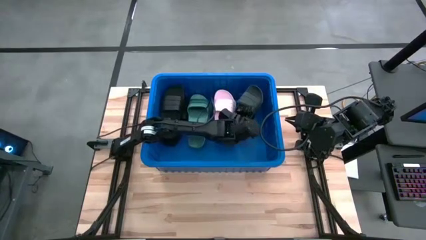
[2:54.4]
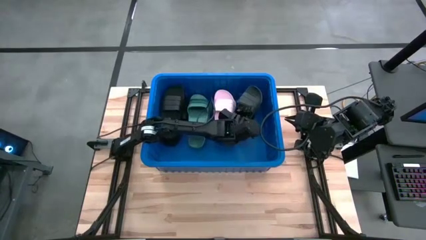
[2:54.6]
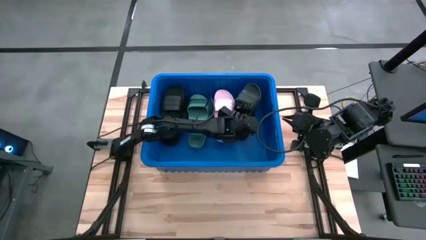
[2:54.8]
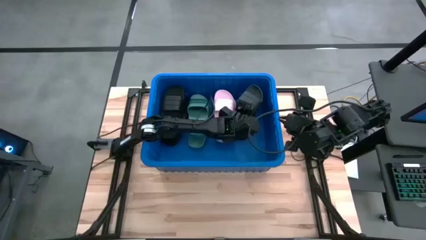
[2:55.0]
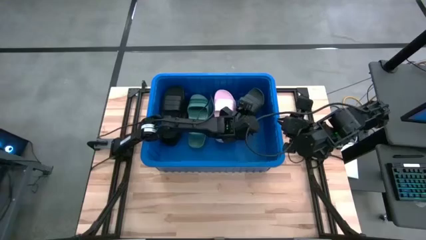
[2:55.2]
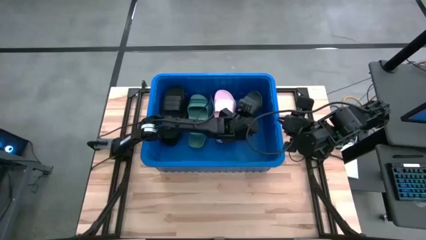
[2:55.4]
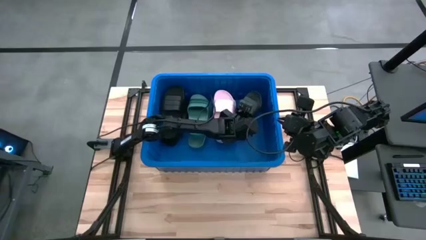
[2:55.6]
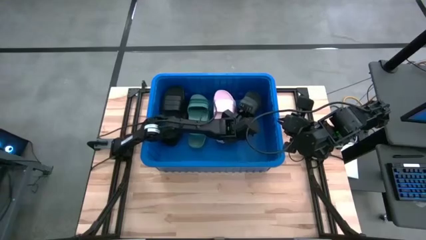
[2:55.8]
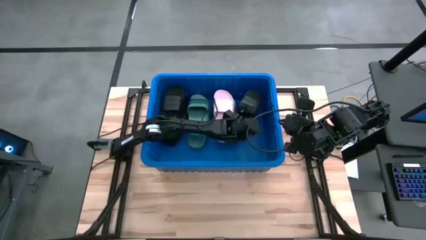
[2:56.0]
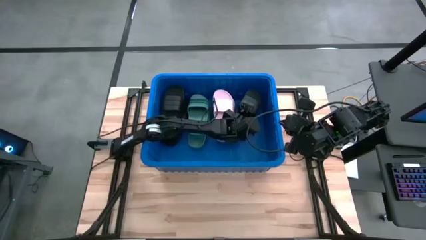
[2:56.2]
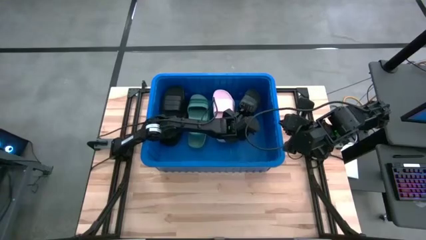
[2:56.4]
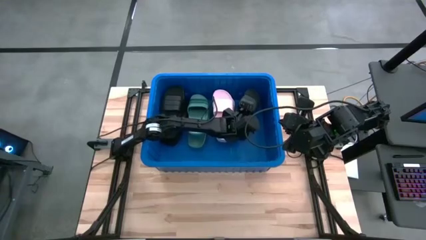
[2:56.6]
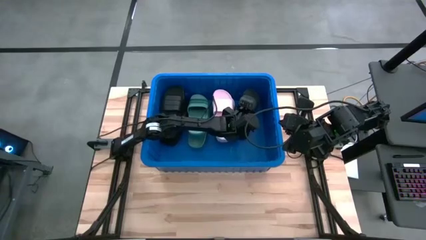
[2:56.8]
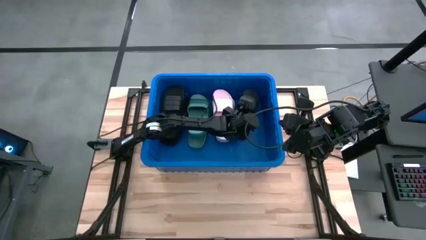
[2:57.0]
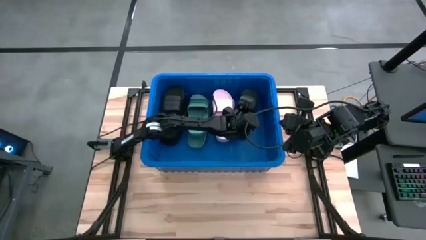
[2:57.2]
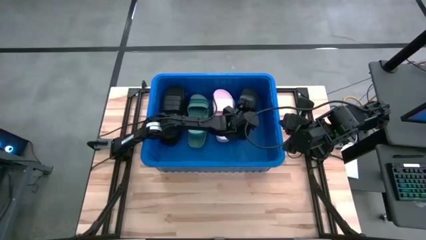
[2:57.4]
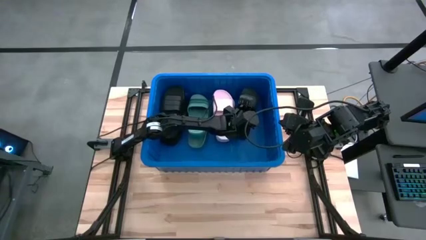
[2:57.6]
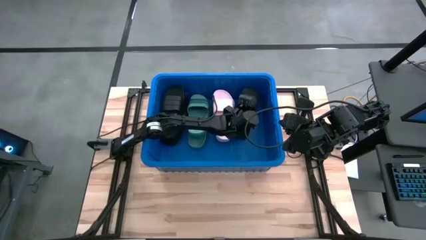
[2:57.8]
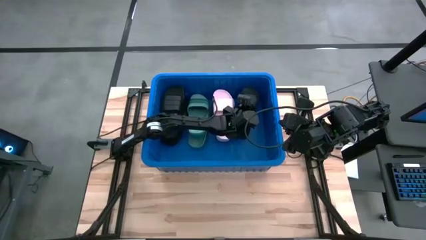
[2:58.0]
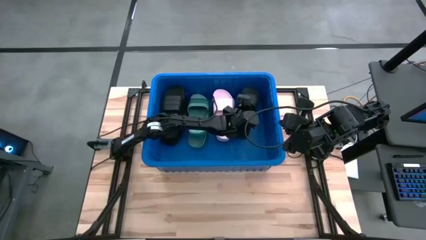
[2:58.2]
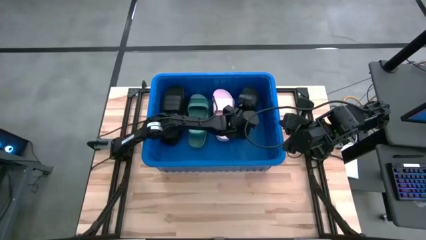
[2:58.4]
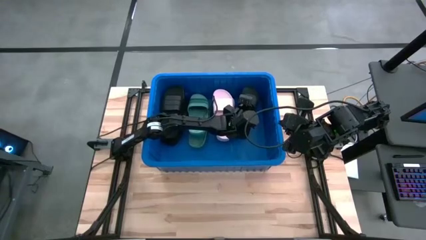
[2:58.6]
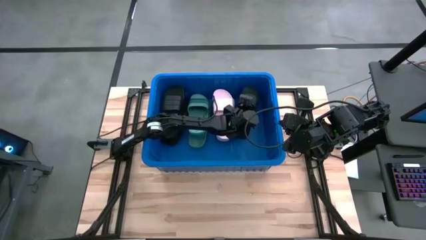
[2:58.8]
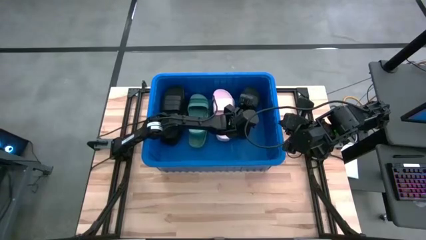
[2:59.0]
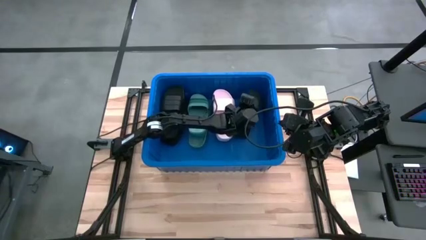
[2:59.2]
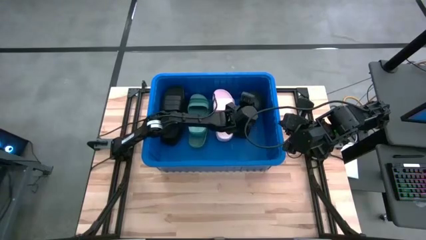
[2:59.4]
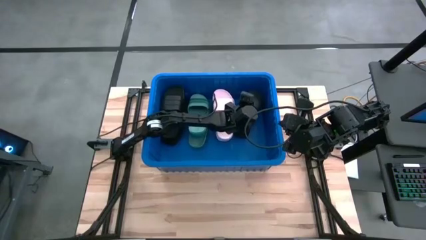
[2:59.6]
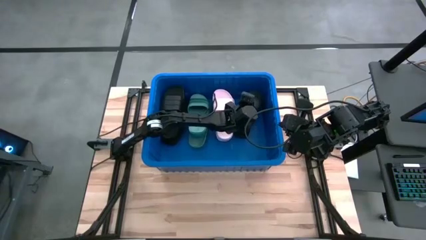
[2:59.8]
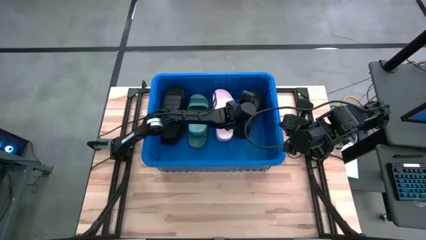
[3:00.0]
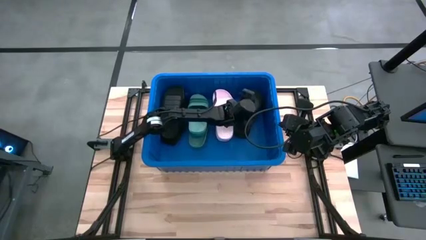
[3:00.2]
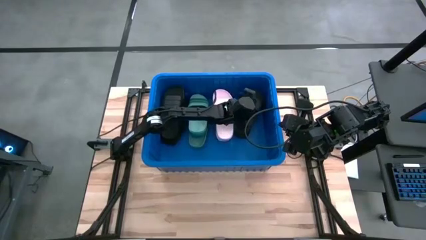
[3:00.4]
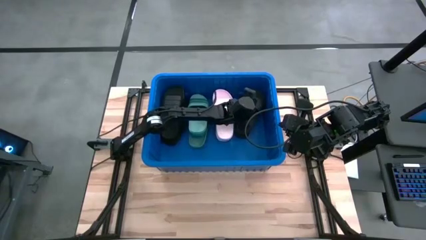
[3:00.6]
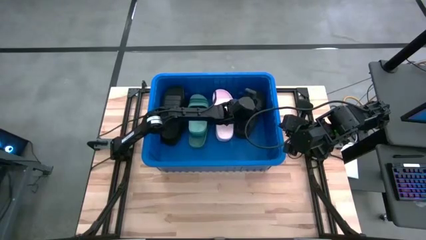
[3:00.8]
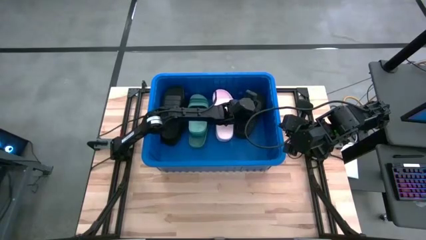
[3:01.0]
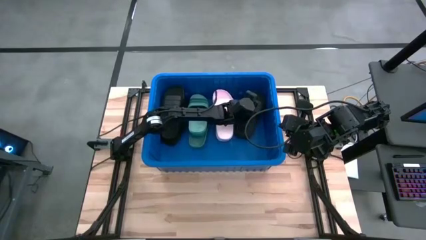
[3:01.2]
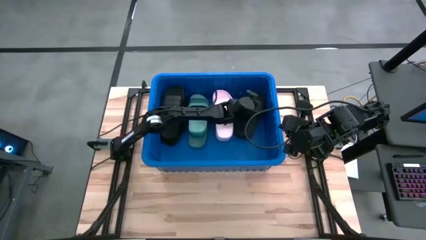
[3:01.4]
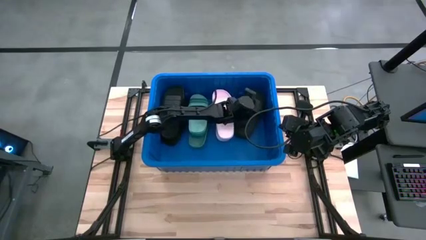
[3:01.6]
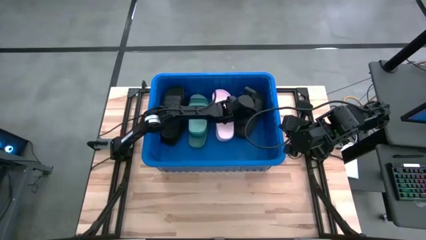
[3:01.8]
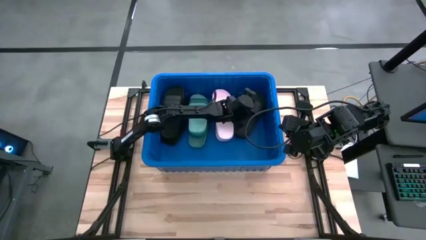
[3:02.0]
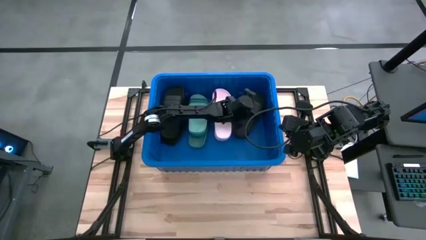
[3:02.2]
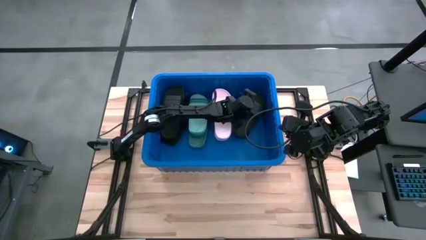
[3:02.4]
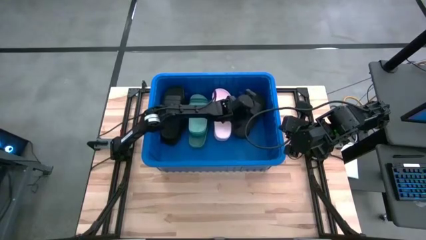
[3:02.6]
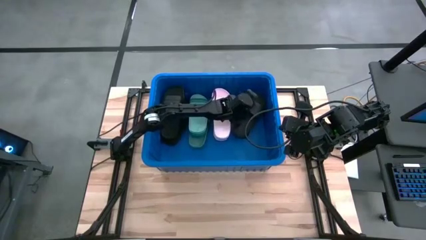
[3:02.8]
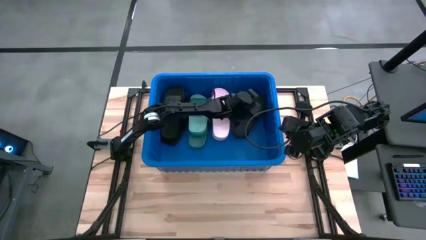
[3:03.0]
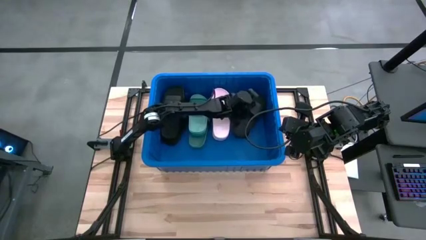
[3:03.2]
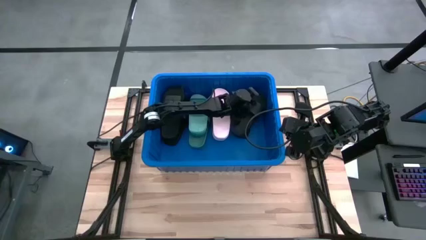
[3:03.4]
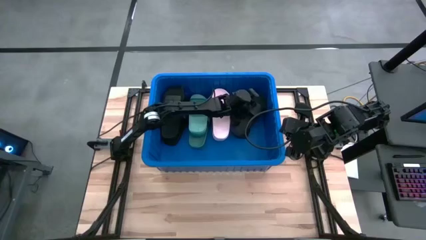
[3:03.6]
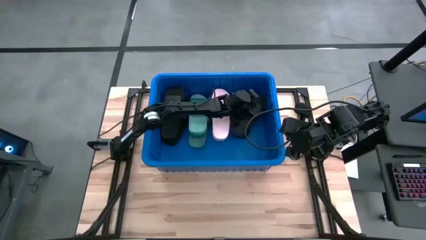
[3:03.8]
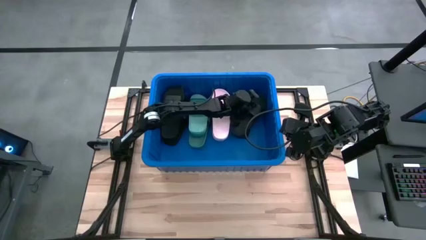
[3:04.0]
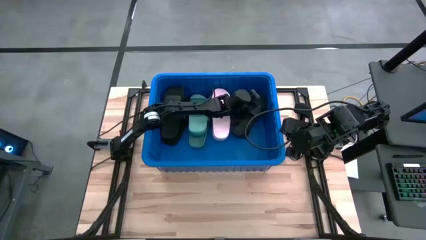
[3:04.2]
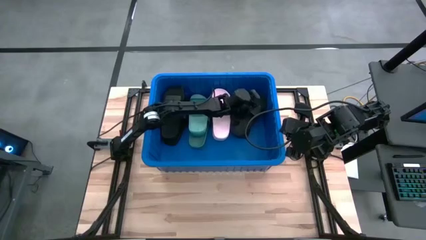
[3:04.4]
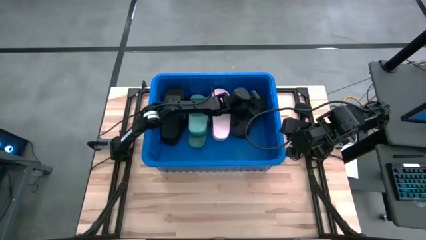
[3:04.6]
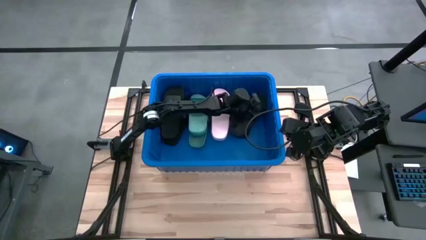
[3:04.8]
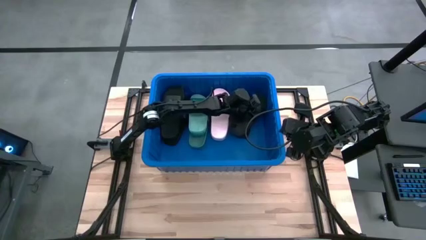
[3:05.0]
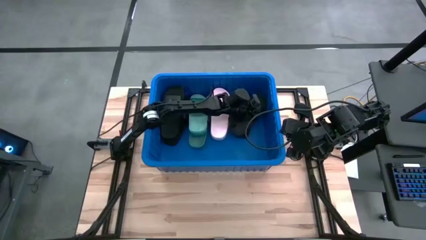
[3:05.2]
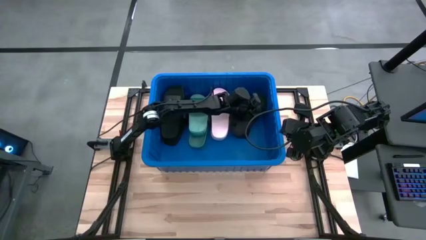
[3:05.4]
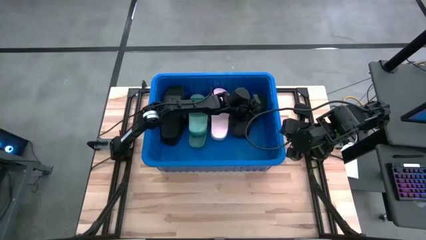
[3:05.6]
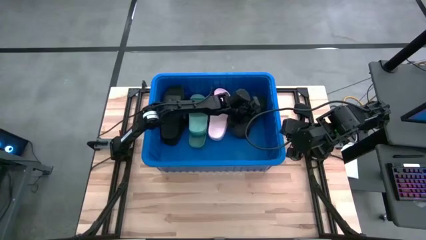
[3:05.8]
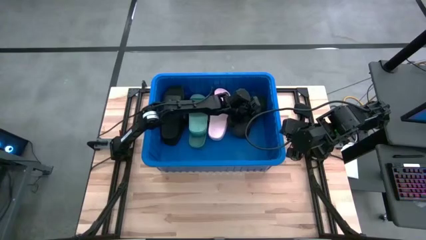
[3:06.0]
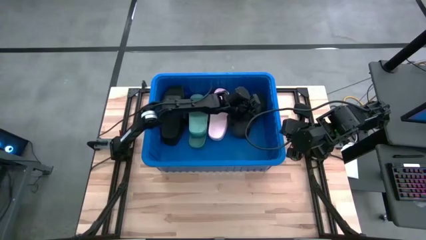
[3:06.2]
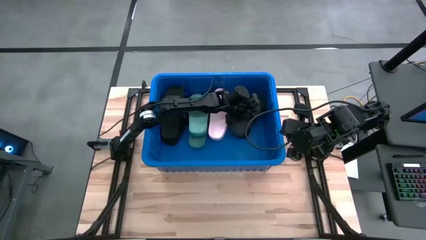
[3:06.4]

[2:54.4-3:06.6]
Task: Pick and place slides into bin
Put the black slipper on the black slipper

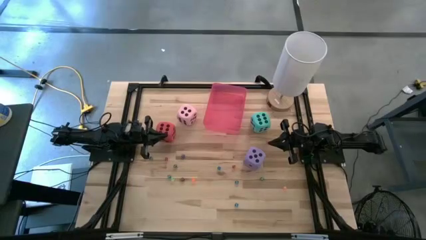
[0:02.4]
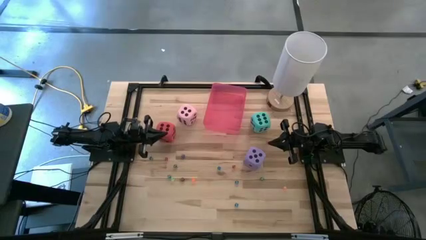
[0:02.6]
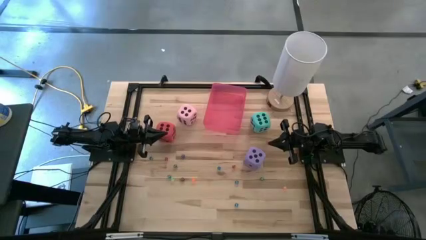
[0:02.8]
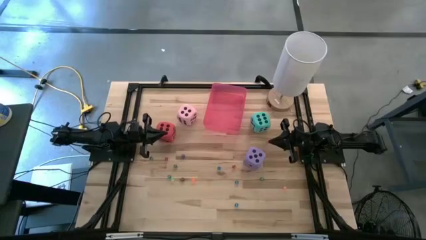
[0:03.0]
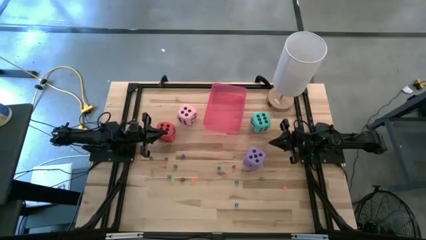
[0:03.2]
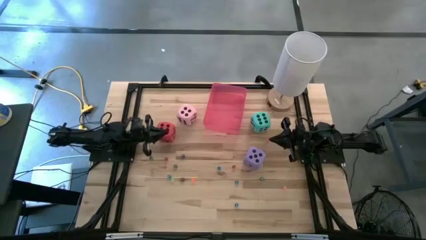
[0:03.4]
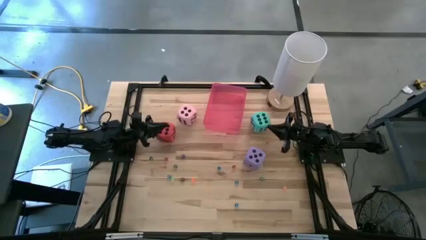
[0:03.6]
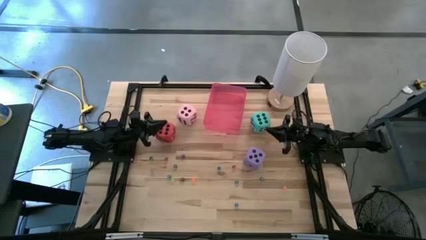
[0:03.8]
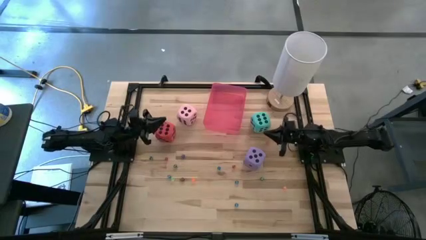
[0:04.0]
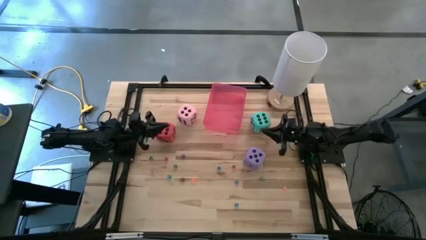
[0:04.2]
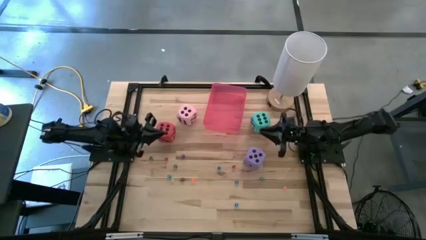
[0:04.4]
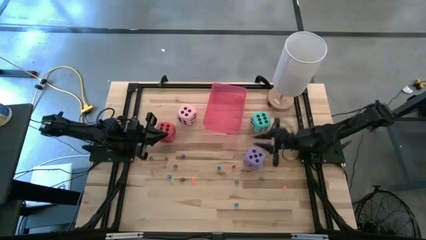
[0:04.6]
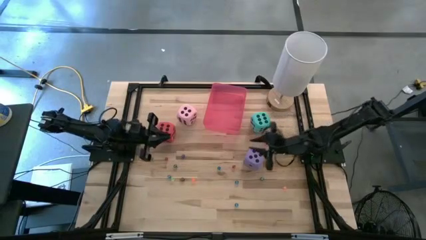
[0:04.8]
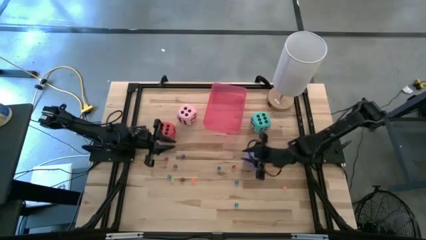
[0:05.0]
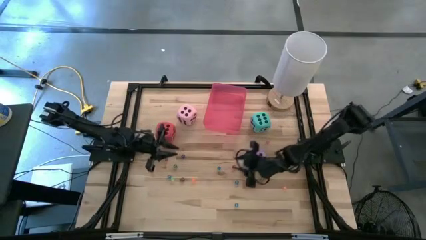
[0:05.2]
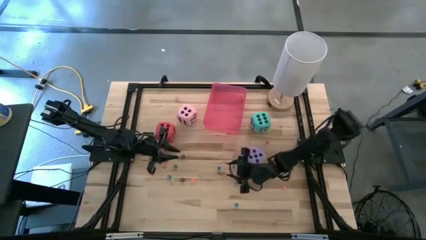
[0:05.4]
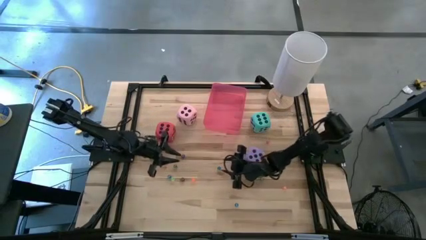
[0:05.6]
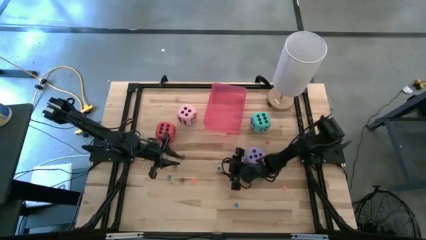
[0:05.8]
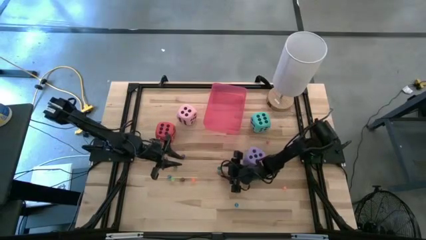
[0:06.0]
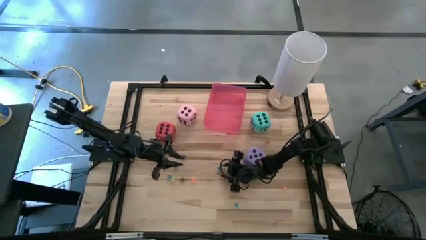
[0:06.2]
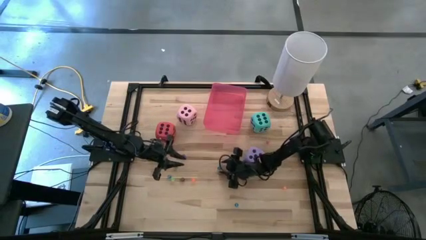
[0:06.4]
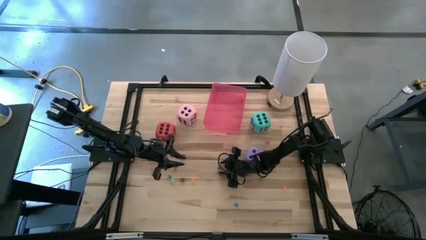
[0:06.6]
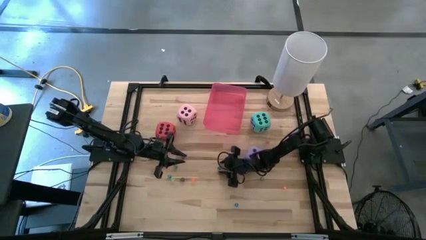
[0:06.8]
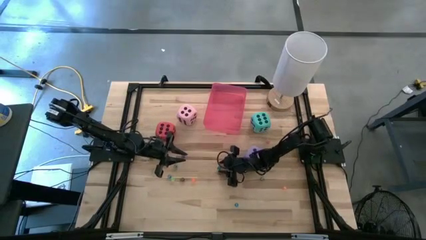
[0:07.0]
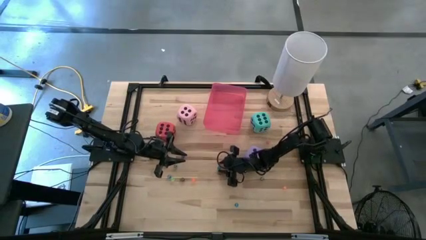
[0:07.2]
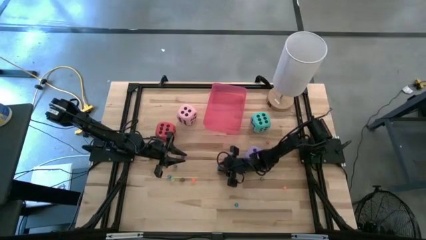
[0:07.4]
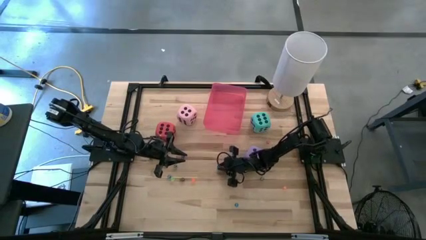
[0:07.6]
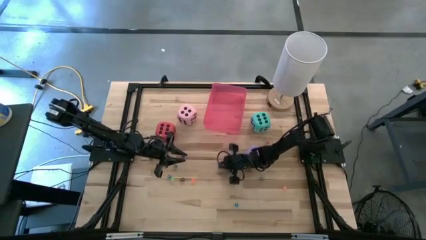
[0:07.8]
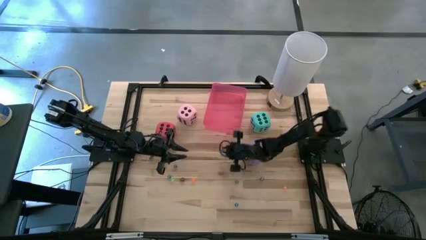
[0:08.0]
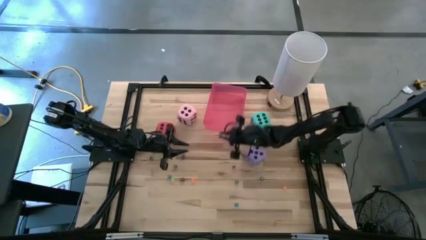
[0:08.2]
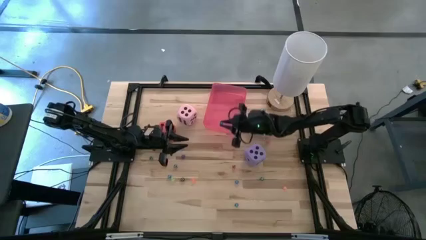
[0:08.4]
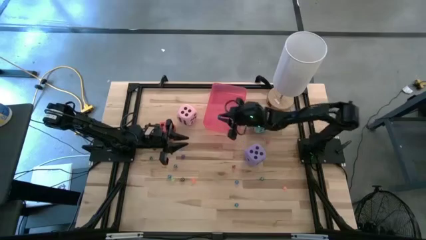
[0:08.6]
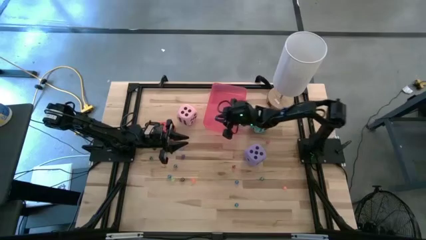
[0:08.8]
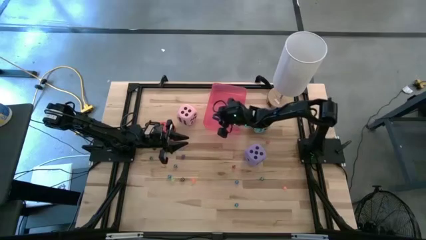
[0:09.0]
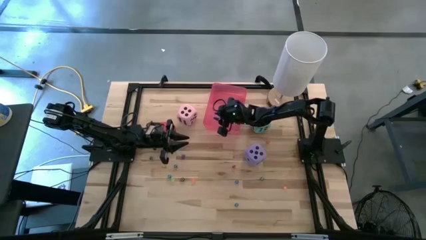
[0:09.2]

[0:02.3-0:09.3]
Task: Pick & Place Dice
Put the small blue dice into the bin
